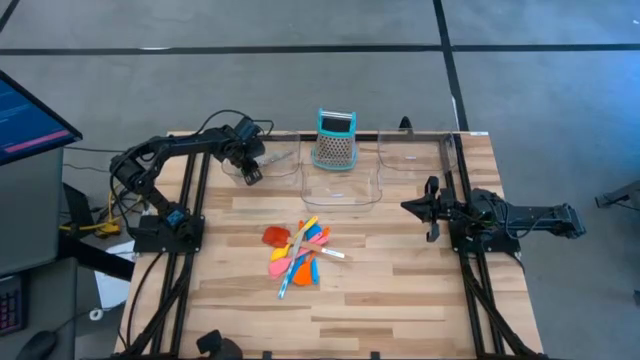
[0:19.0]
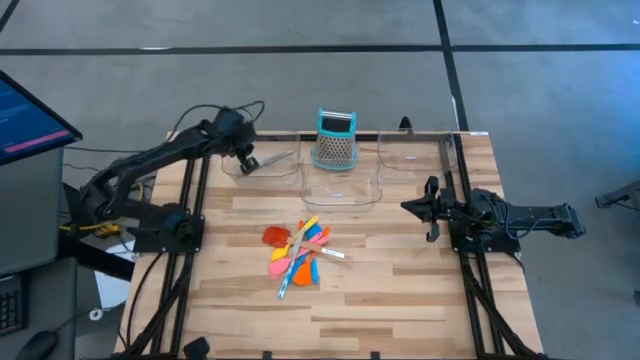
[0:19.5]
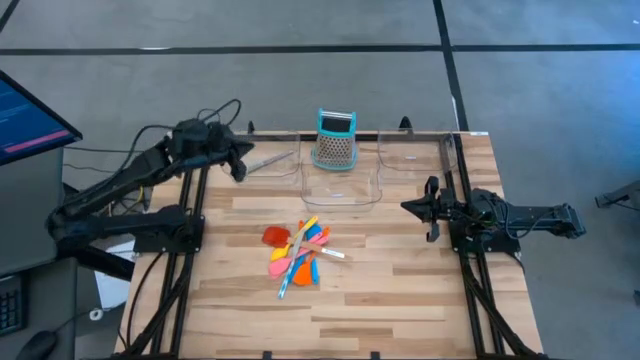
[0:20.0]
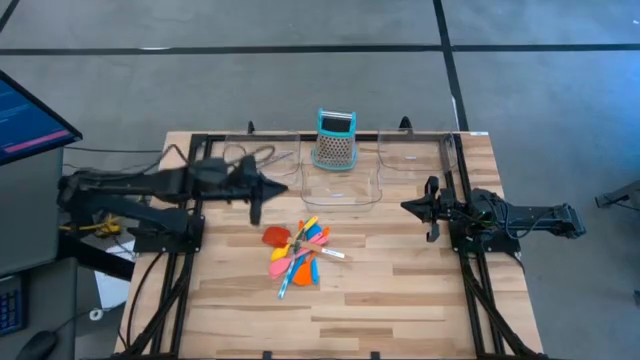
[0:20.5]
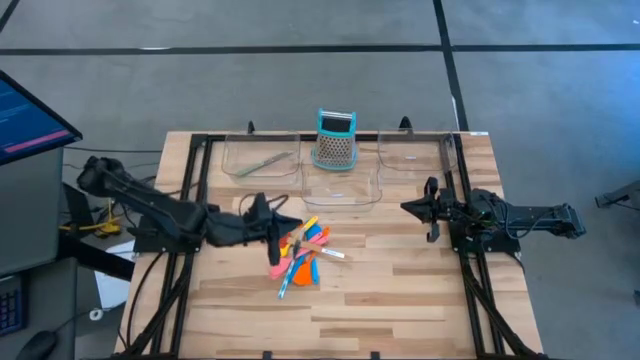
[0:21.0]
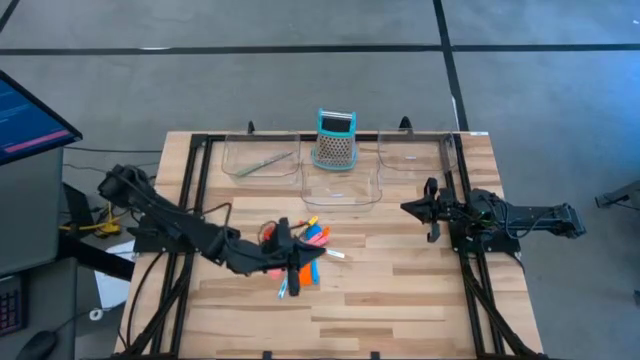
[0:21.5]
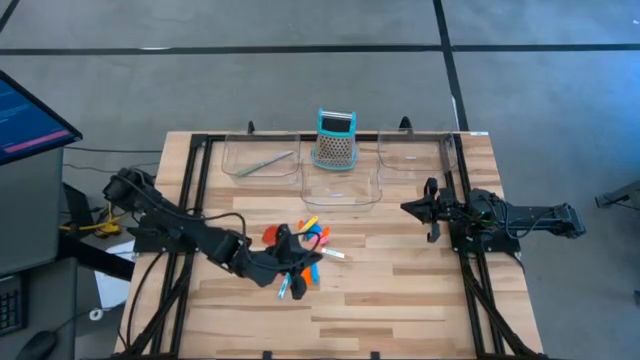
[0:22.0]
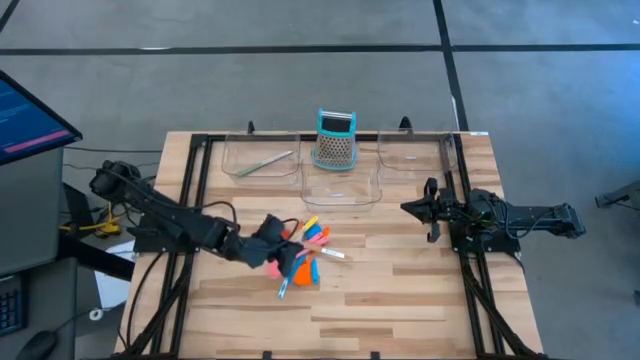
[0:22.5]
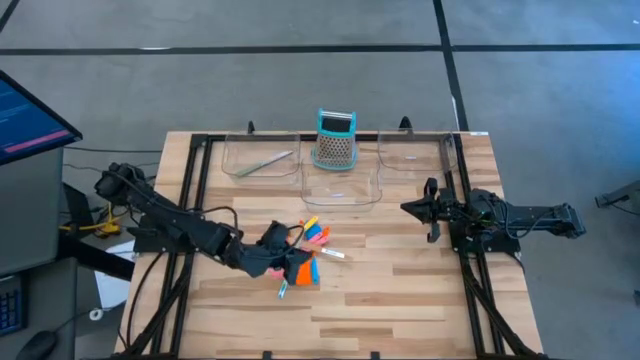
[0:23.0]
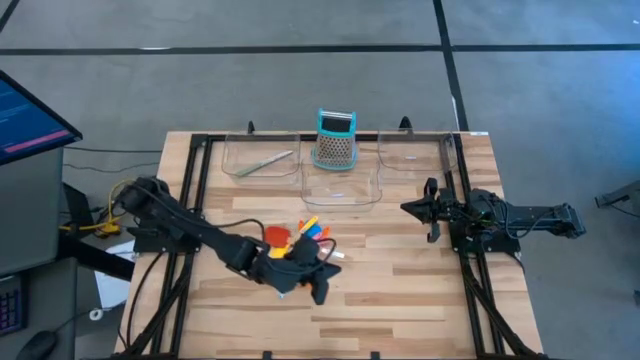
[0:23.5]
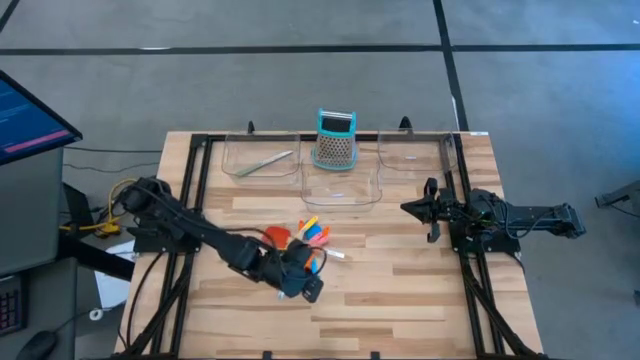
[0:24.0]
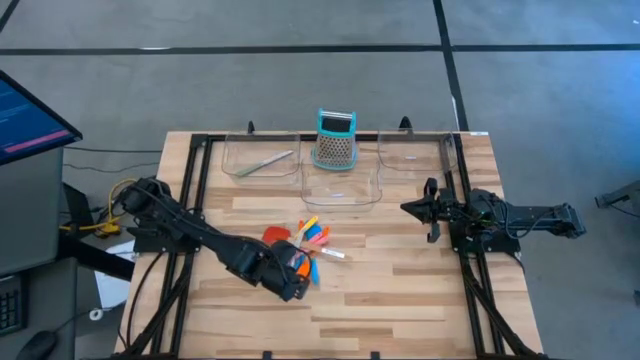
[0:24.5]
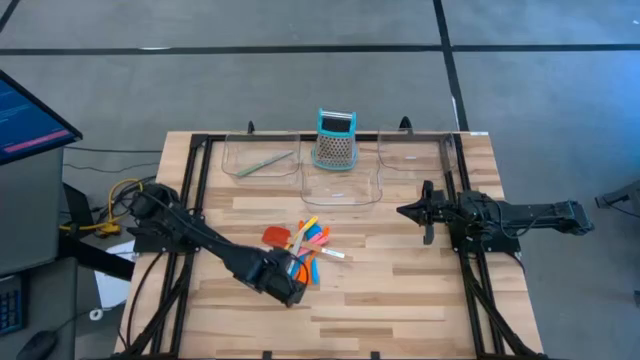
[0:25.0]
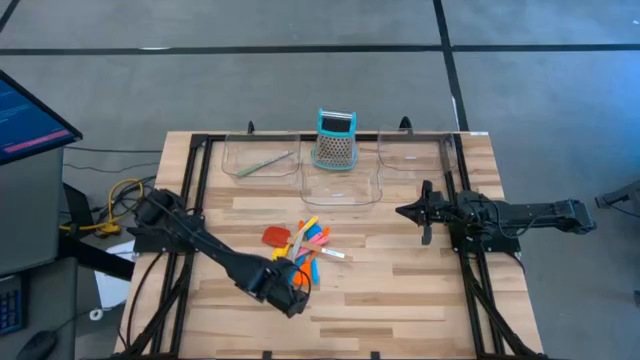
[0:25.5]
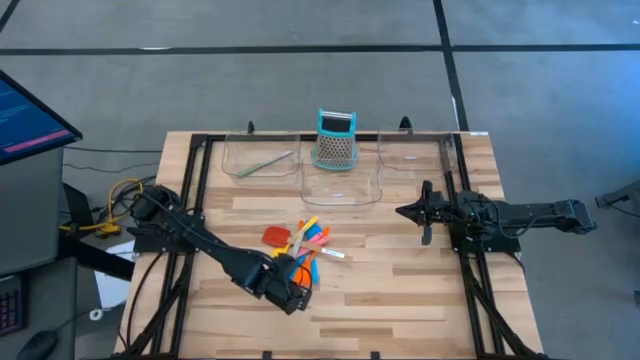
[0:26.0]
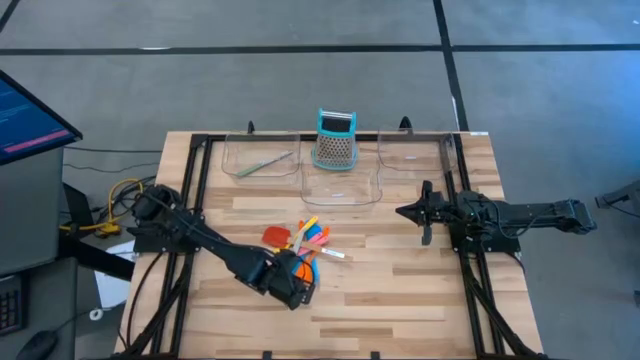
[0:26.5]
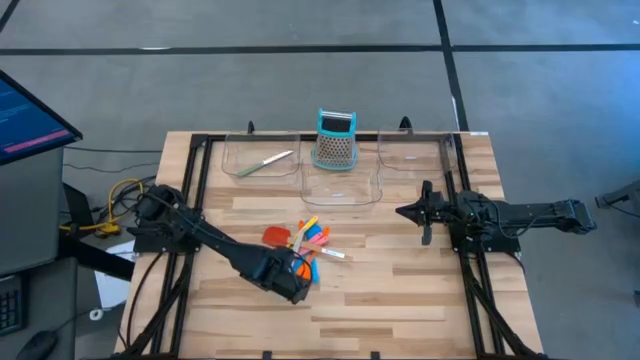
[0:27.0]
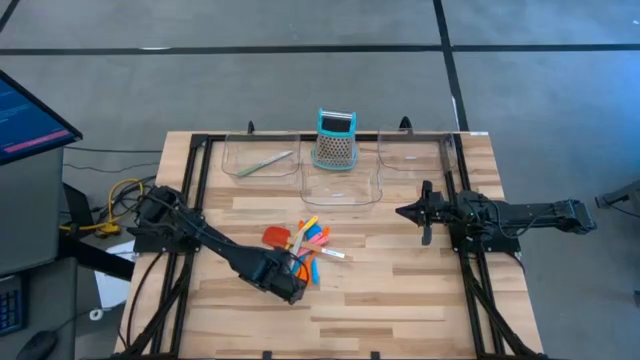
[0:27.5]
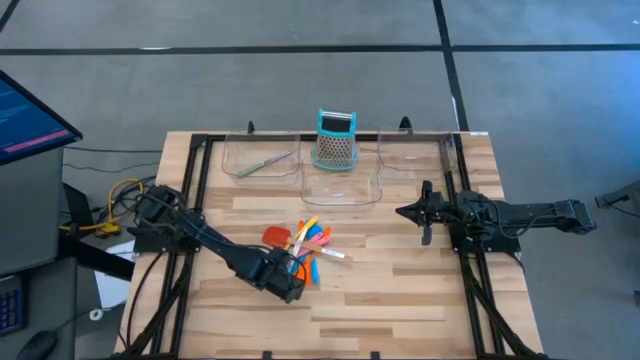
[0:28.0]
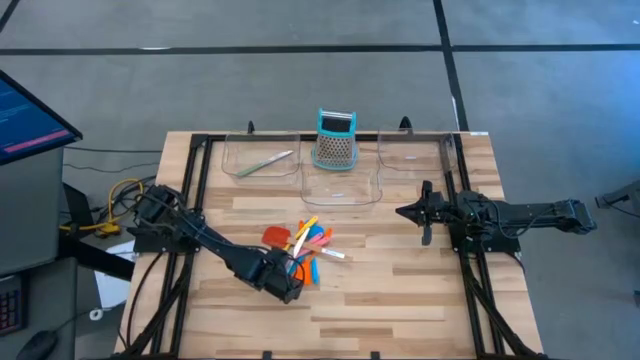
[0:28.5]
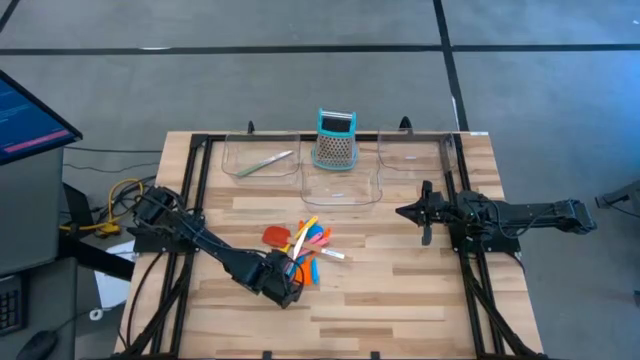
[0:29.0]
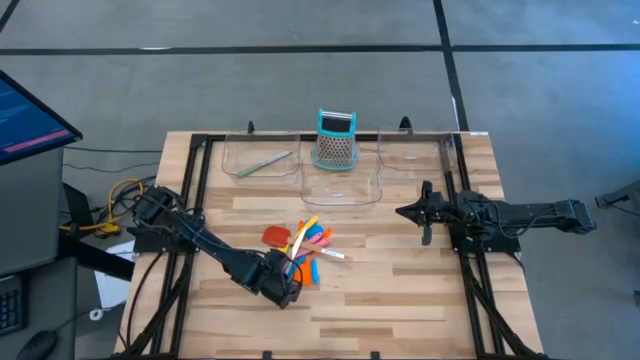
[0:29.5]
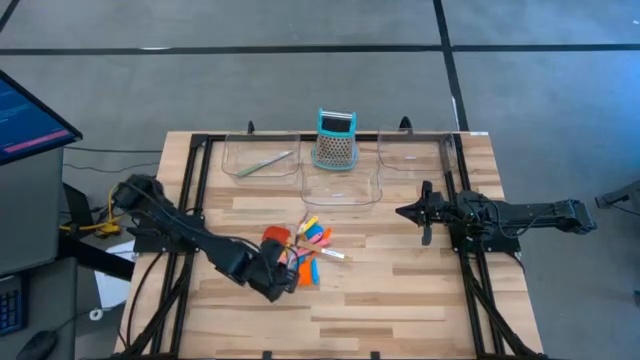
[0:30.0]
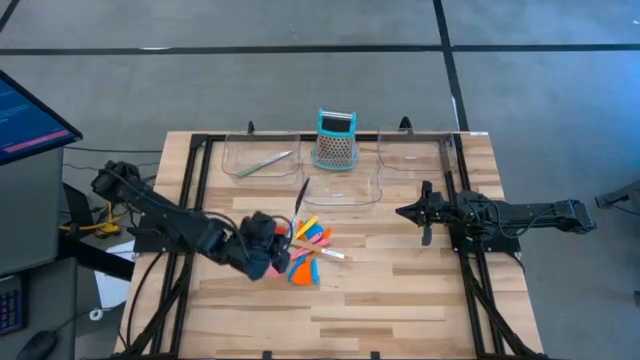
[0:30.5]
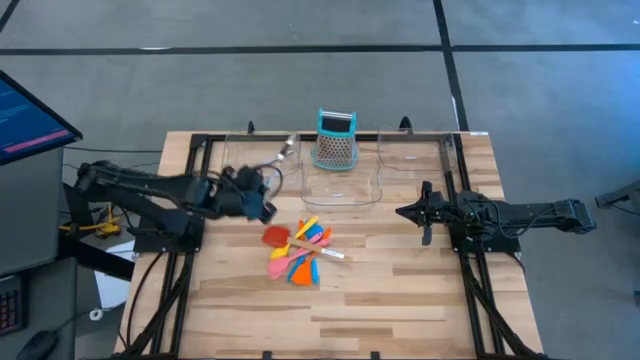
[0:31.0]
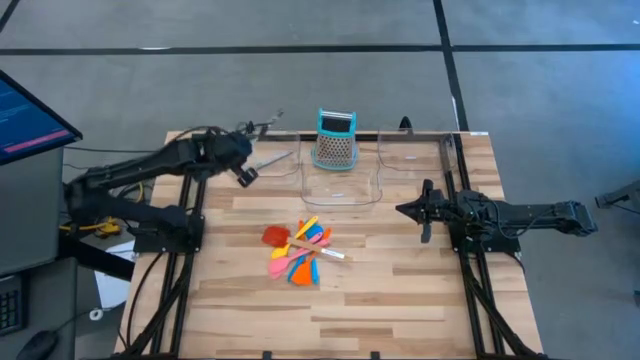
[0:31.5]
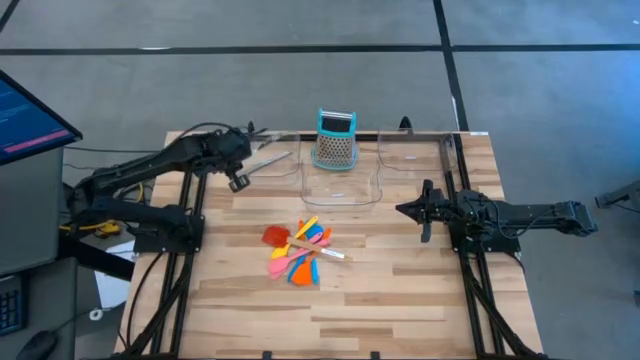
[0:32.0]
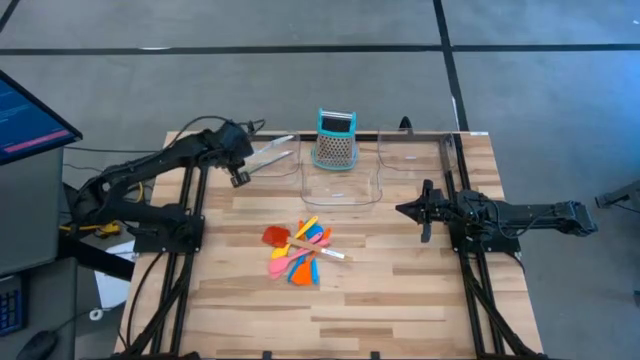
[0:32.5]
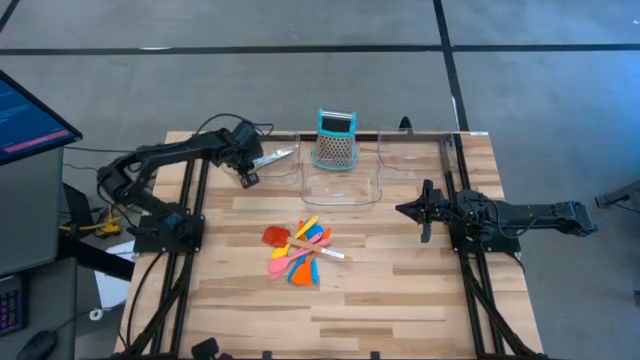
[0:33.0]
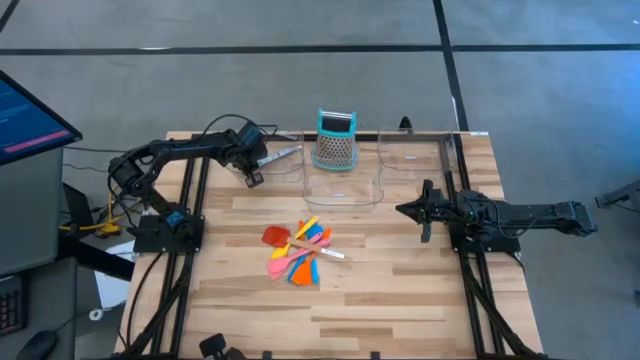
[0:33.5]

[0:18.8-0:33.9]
Task: Pick & Place Kitchen Items
Put the blue table knife into the left transparent bin

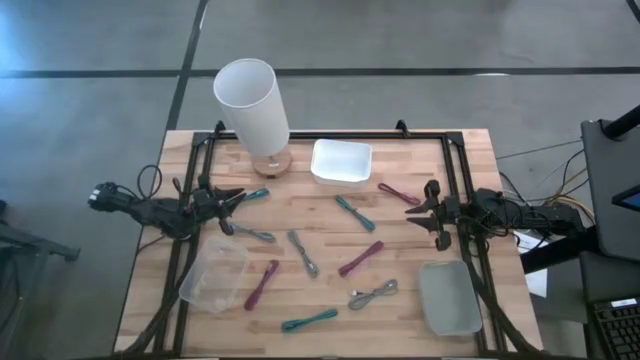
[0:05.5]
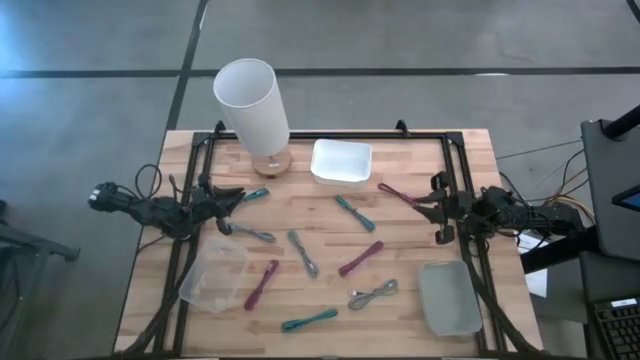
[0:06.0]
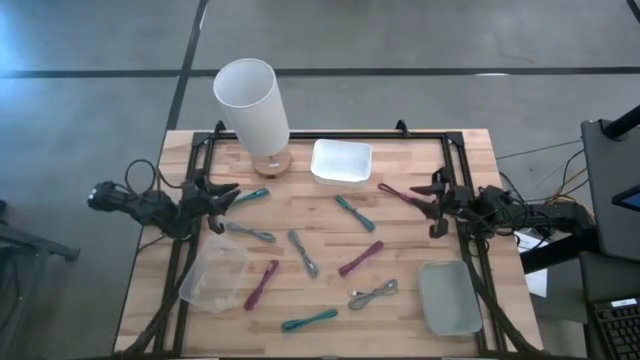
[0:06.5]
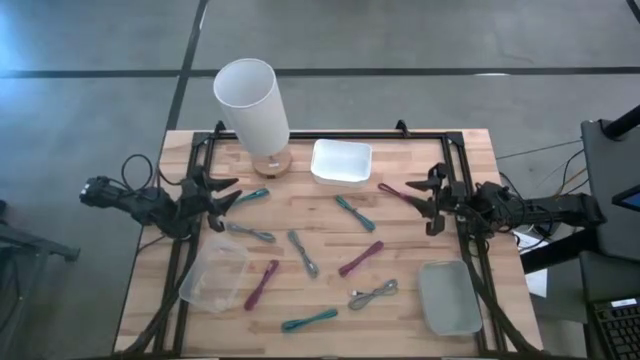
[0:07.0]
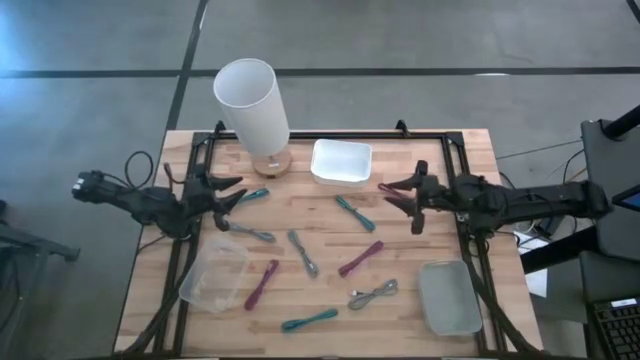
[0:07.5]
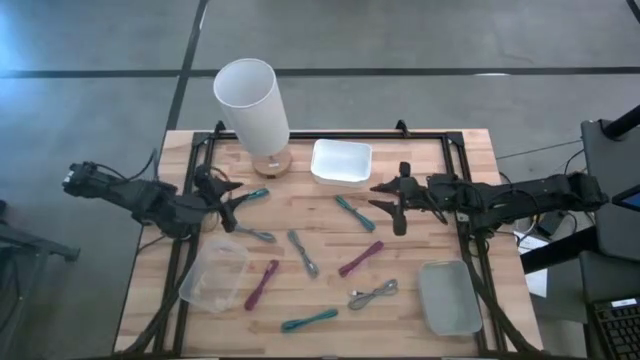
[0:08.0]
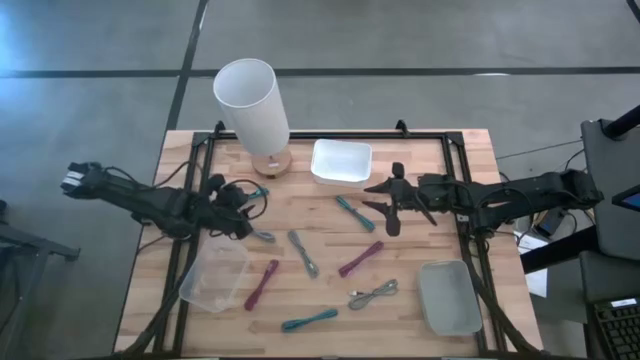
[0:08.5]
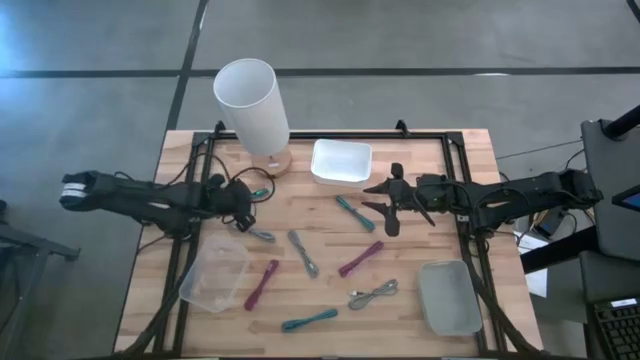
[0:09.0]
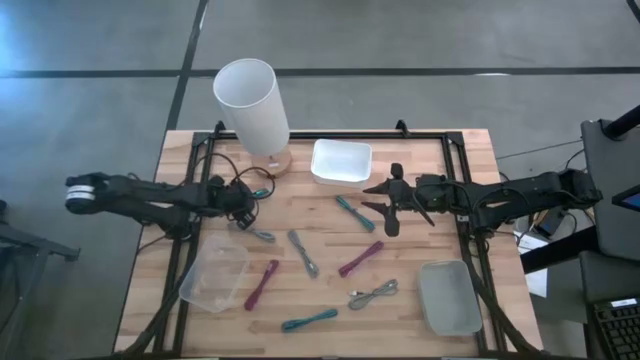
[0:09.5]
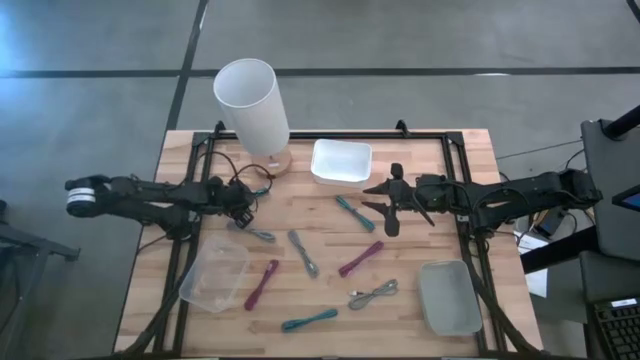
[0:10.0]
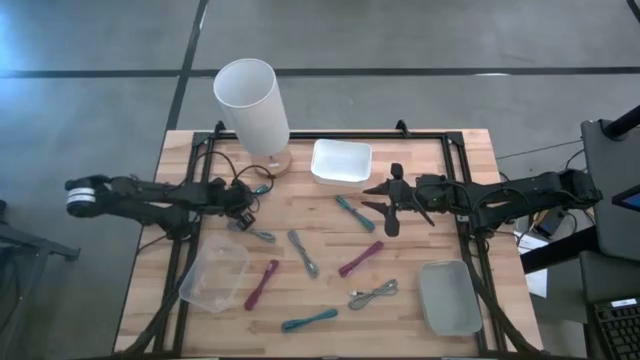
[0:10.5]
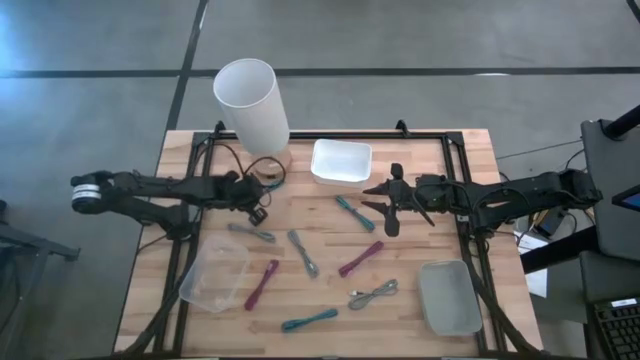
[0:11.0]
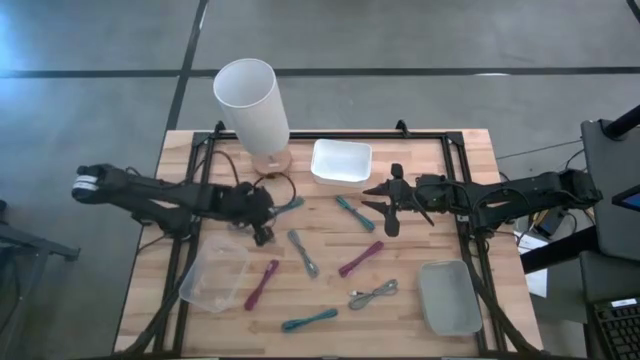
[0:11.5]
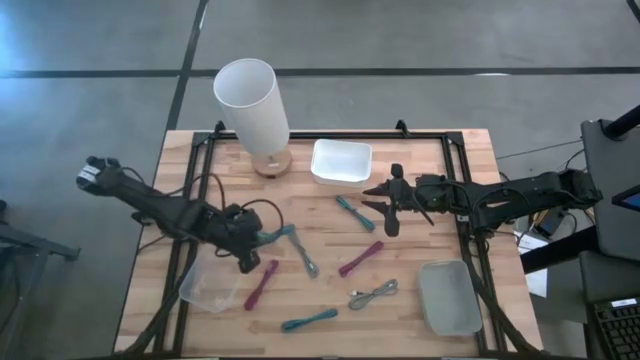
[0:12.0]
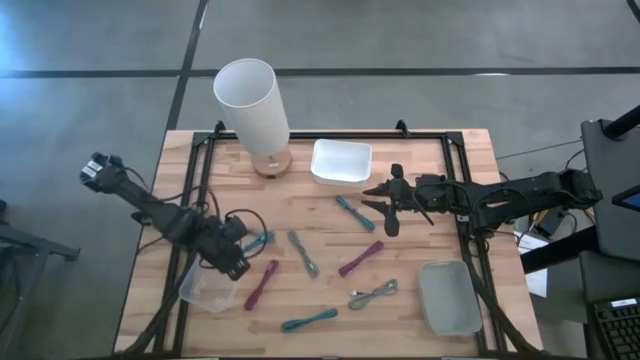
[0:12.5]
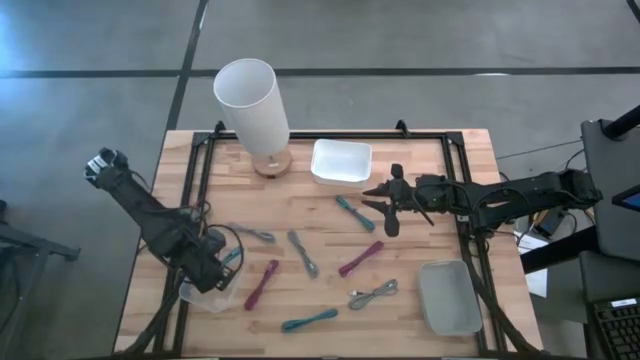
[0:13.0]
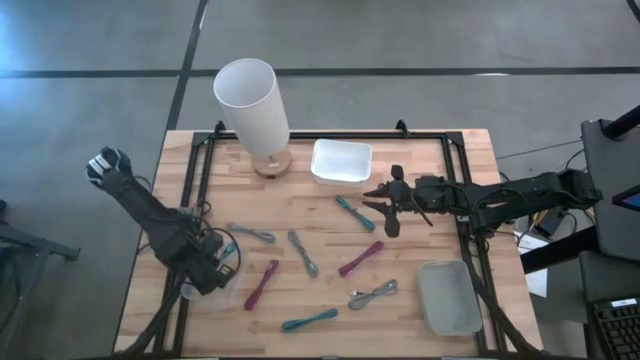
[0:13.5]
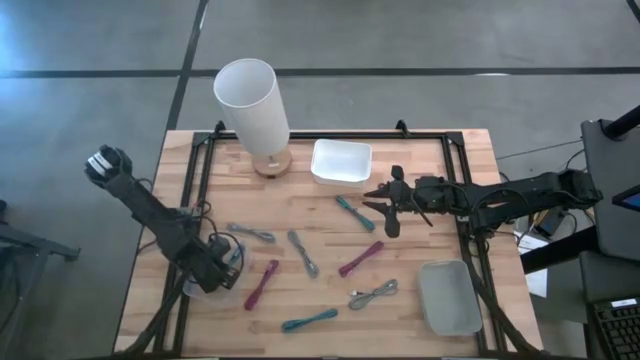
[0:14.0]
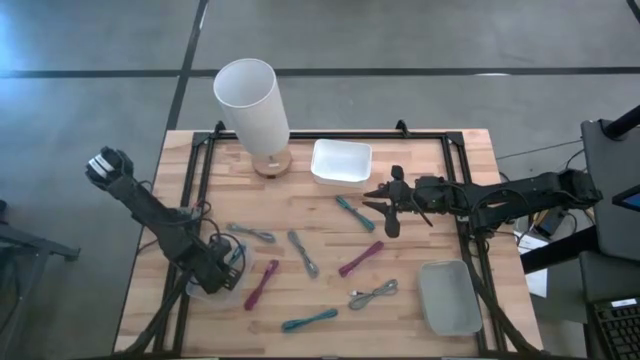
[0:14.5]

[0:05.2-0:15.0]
Task: Pick & Place USB Port
Put the top left blue black charger cable into the transparent bin
